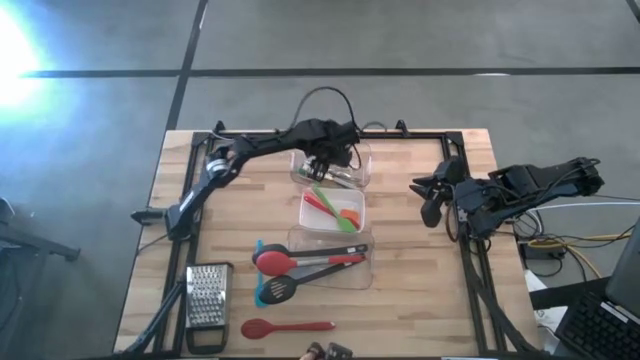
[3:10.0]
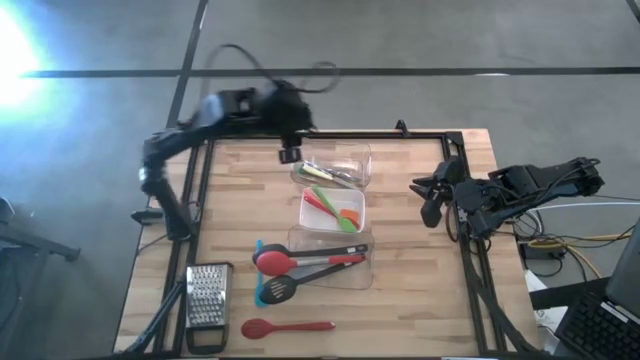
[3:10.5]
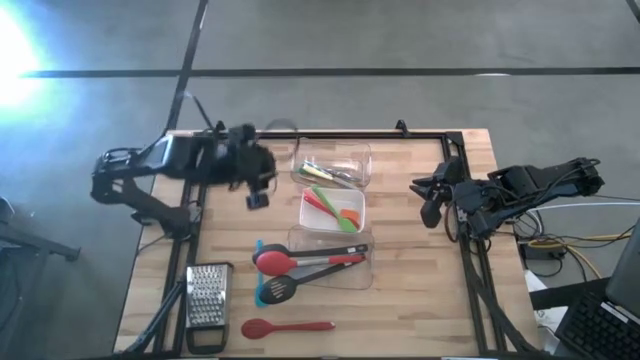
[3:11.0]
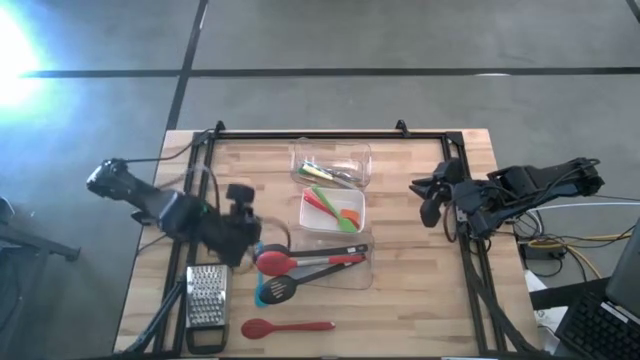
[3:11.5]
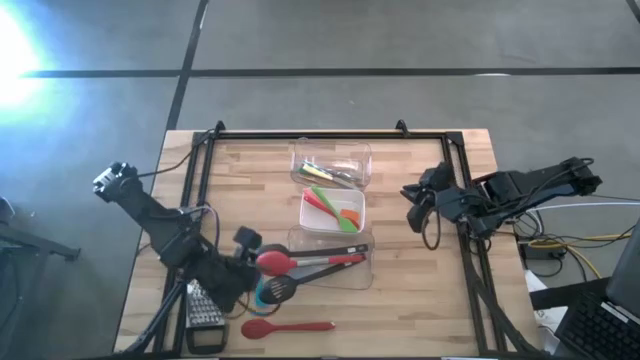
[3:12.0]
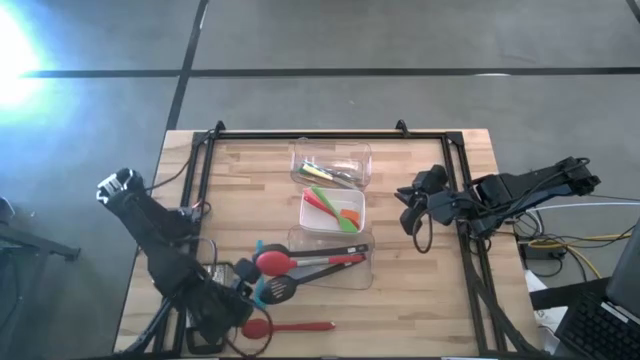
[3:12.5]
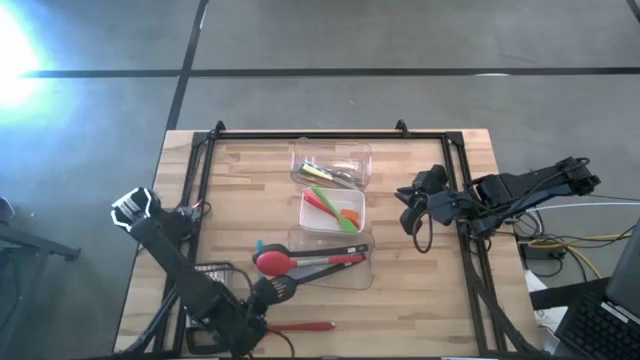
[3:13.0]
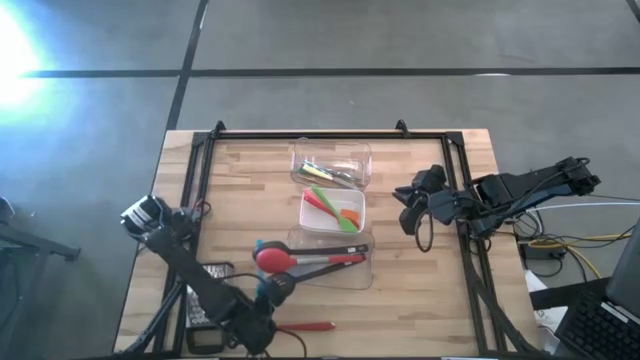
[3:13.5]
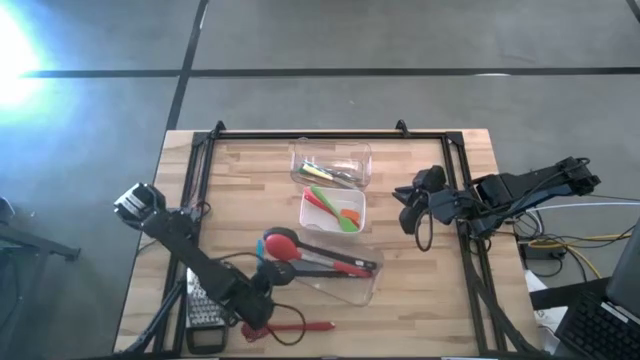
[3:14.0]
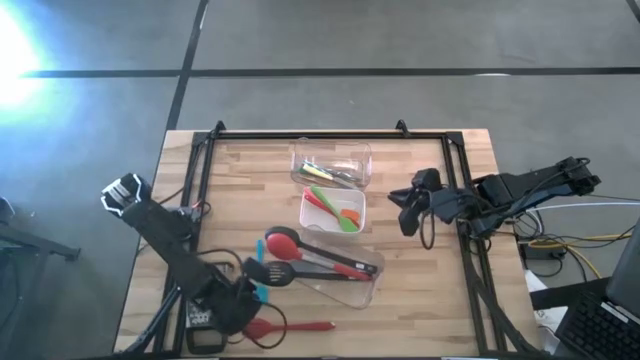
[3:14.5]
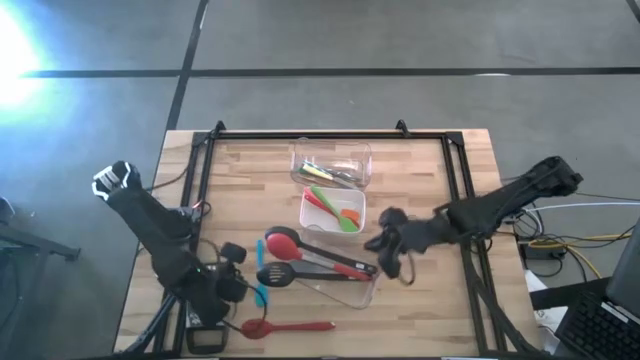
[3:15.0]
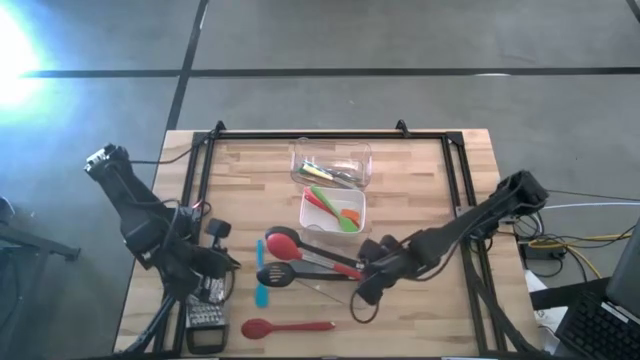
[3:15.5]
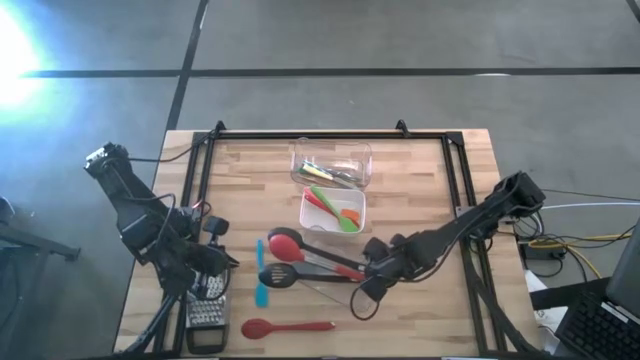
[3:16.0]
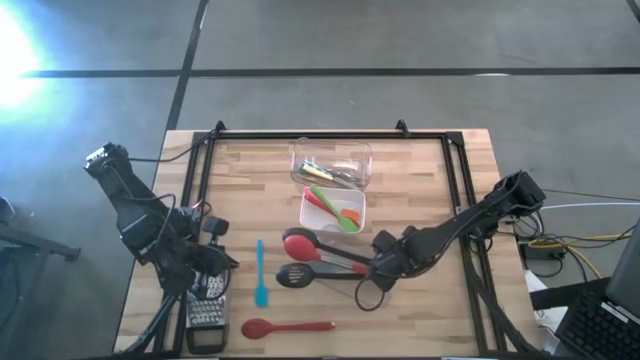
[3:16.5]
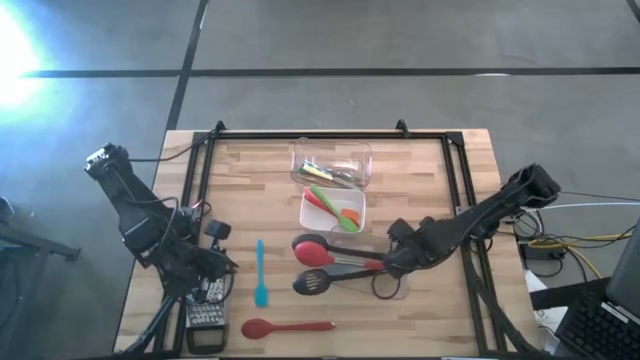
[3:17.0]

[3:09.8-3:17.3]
Task: Pick & Place Kitchen Items
Adjust the bottom transparent bin

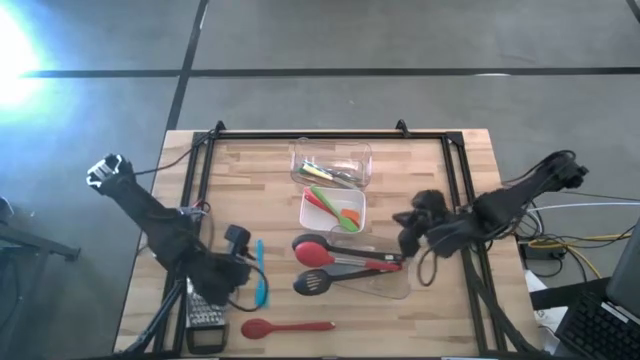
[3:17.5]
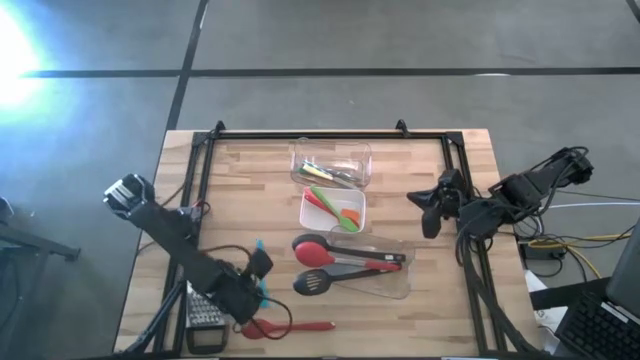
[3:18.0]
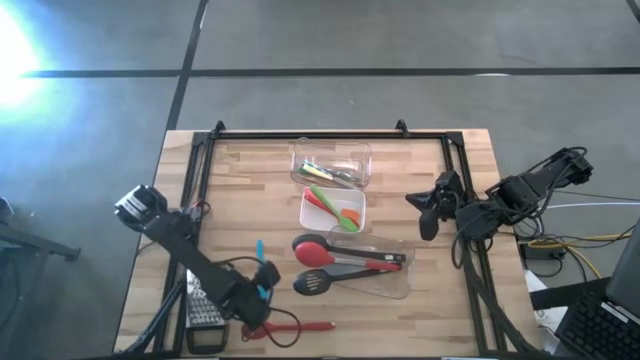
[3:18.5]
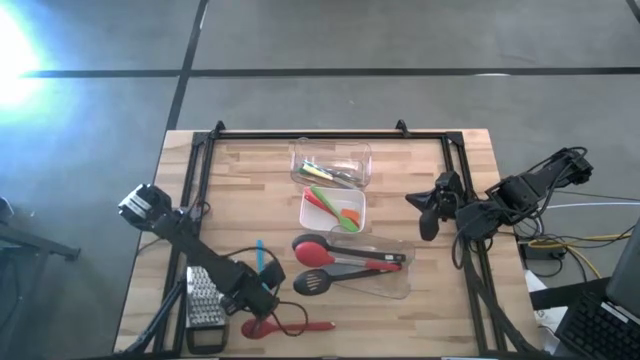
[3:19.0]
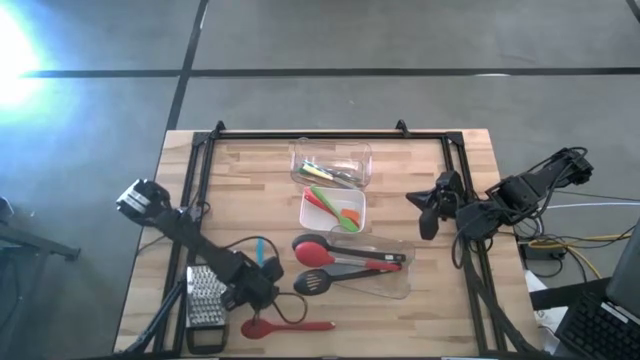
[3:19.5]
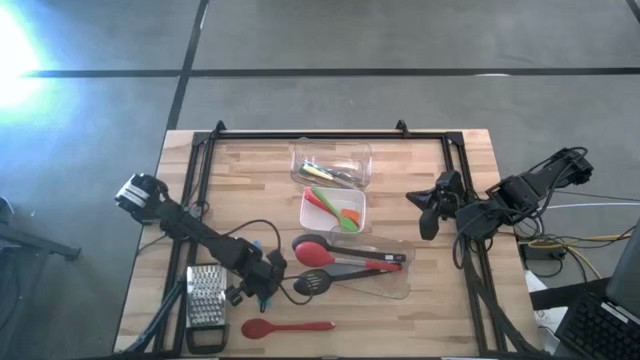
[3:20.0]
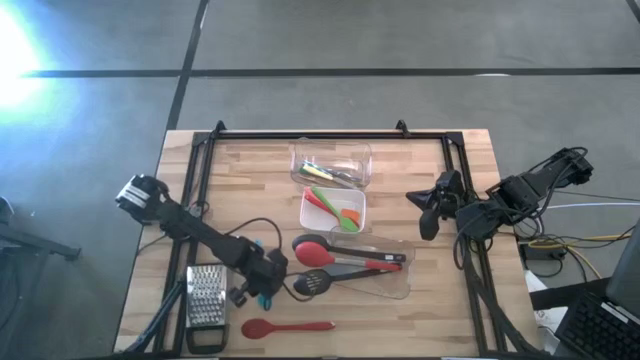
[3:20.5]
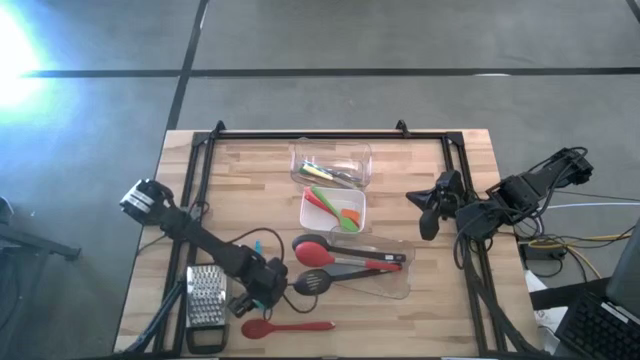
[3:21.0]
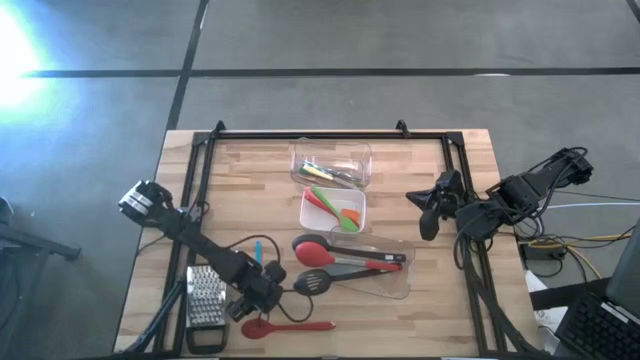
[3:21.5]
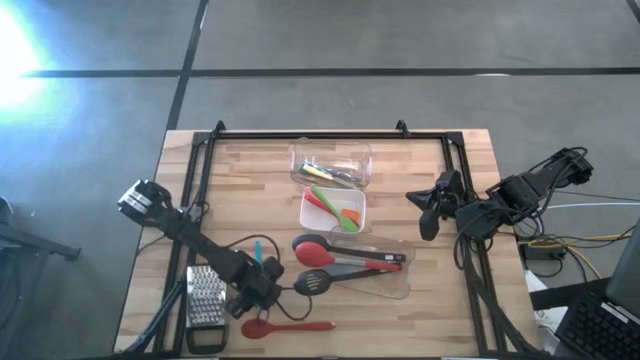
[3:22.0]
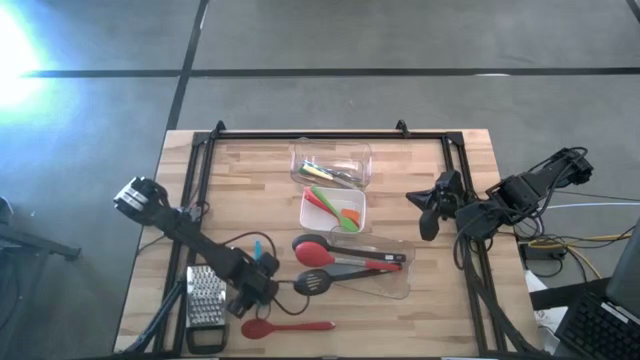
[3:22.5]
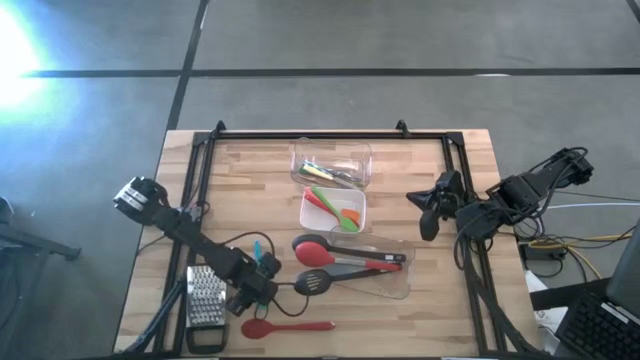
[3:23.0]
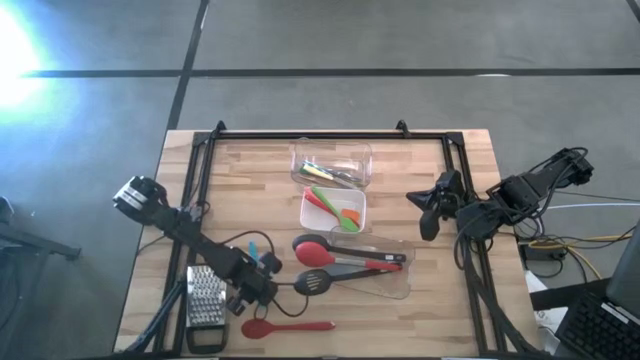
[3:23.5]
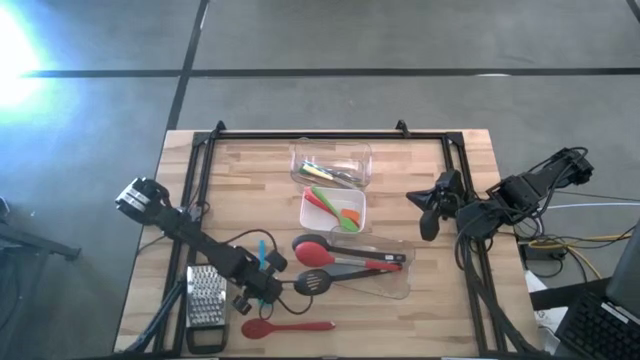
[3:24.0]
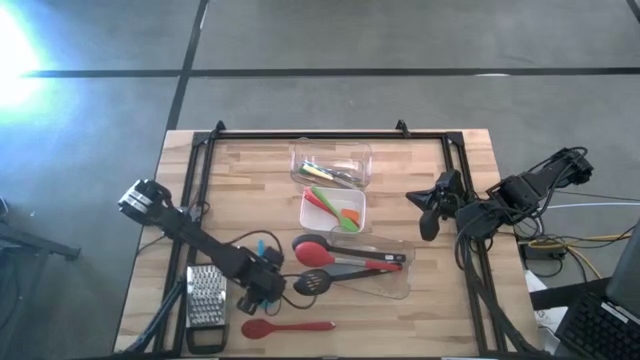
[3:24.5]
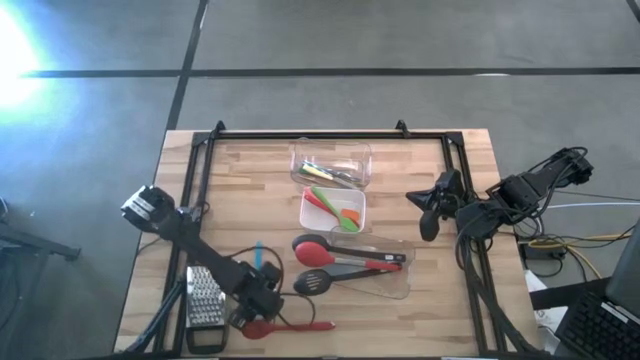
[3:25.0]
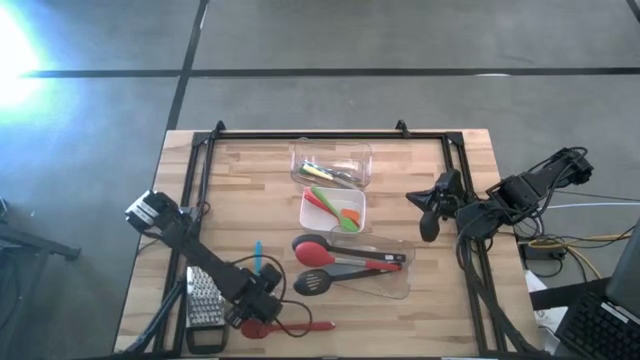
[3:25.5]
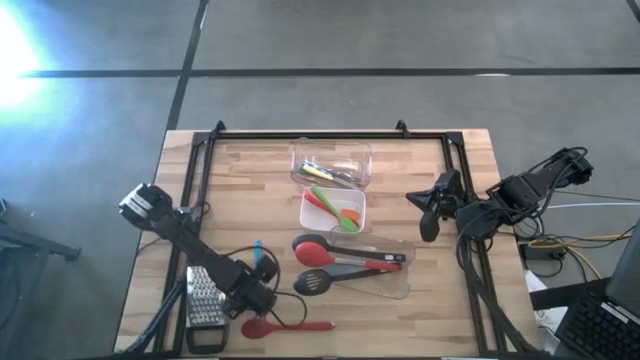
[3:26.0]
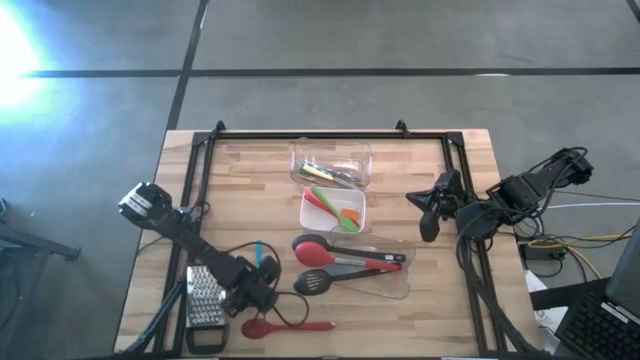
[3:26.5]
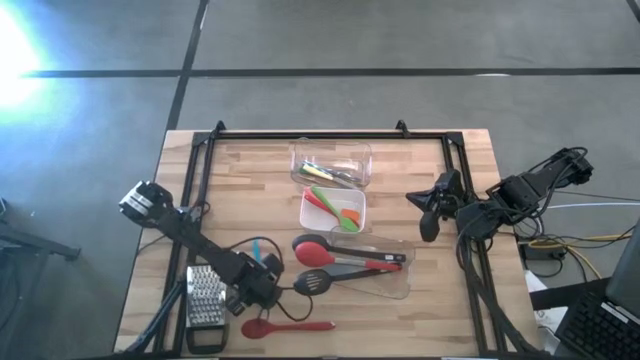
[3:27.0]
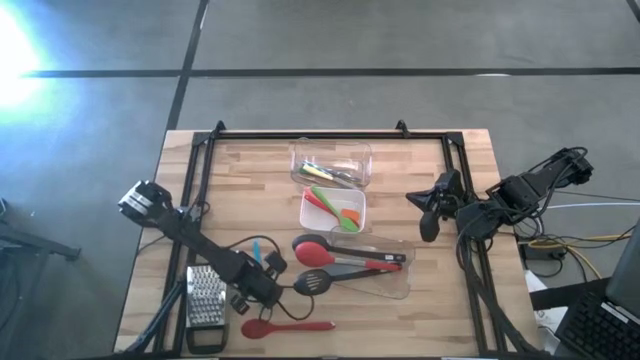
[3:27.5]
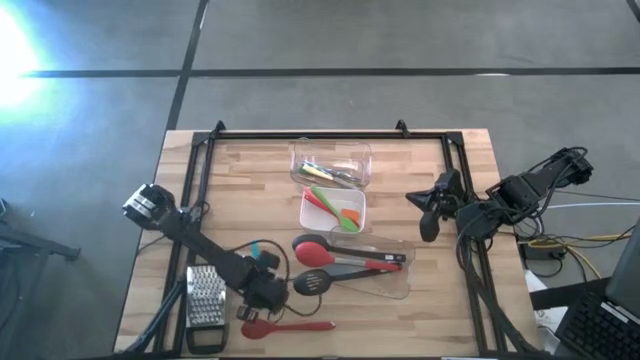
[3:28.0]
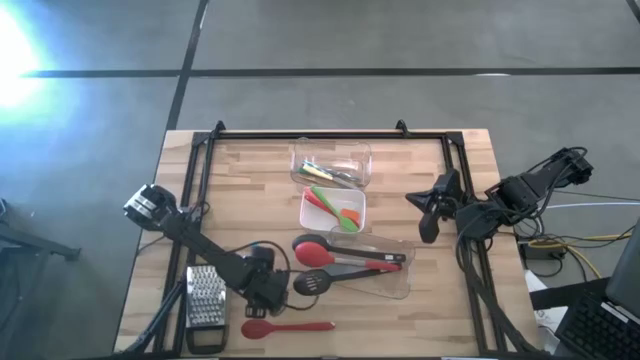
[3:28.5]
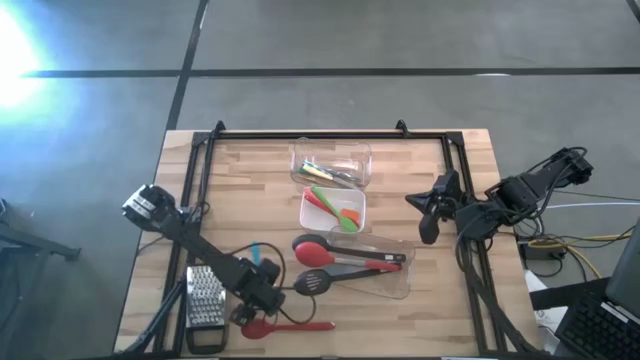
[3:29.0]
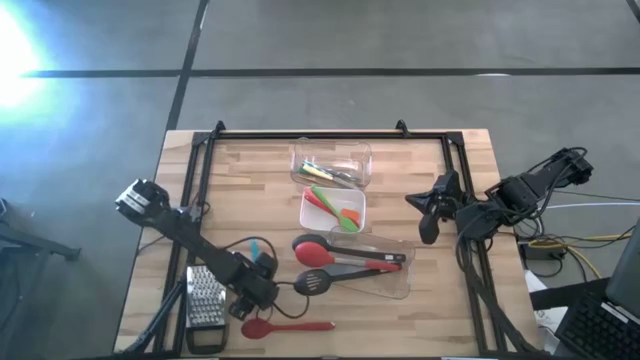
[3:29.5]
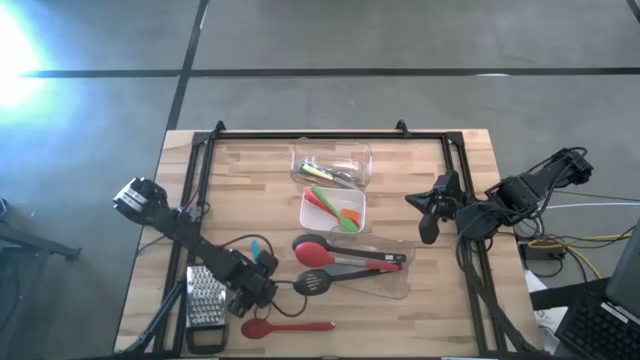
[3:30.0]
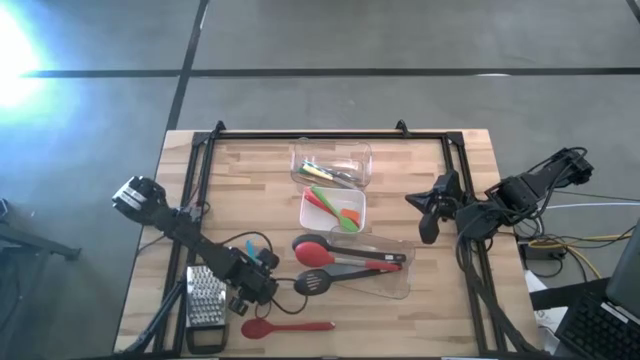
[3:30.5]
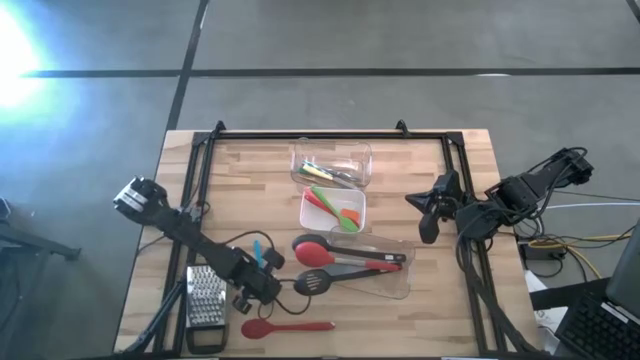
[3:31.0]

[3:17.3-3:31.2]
Put the blue spatula into the white bin
